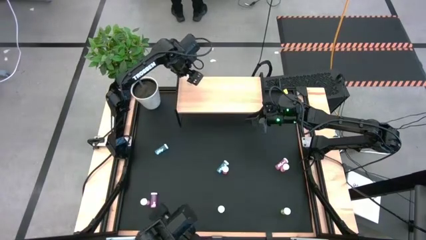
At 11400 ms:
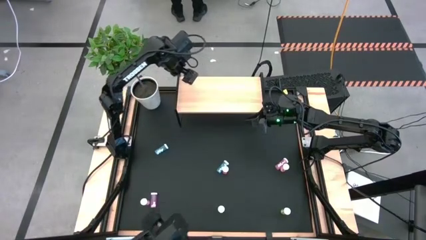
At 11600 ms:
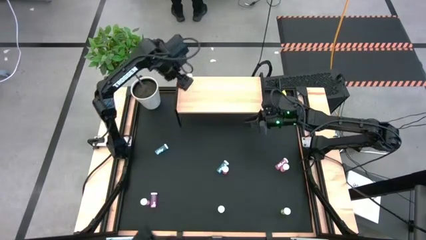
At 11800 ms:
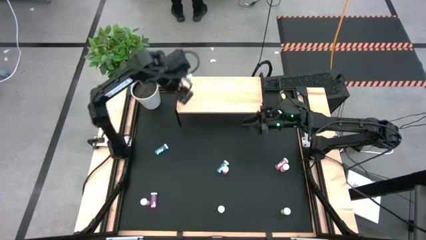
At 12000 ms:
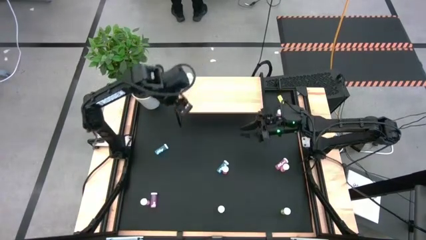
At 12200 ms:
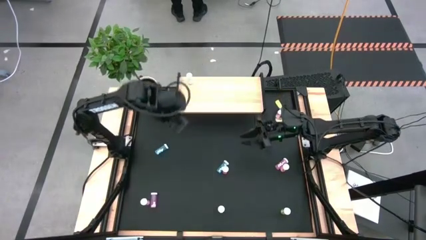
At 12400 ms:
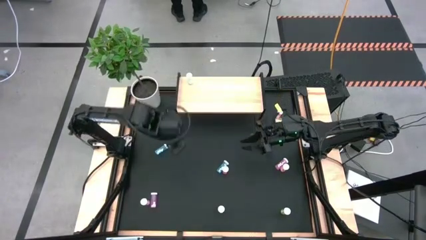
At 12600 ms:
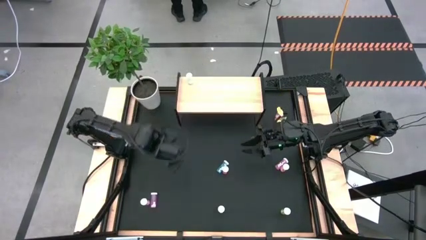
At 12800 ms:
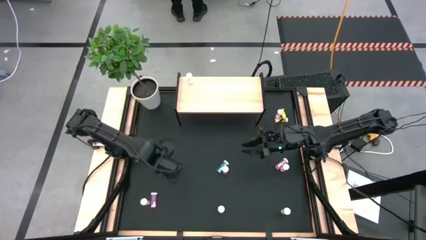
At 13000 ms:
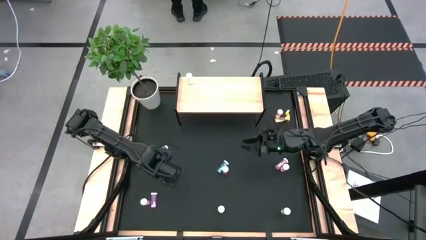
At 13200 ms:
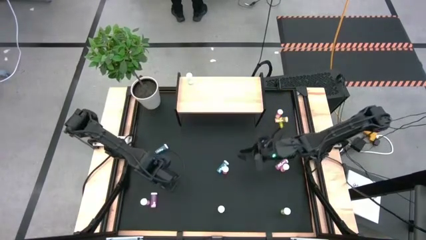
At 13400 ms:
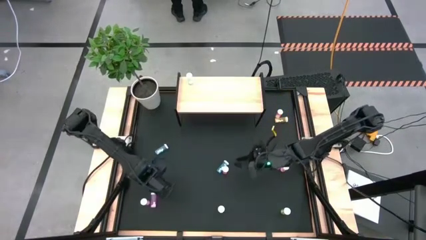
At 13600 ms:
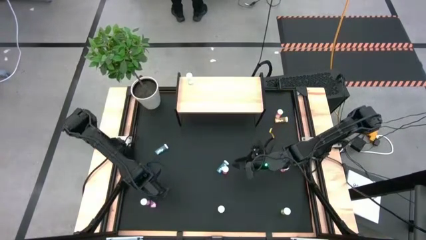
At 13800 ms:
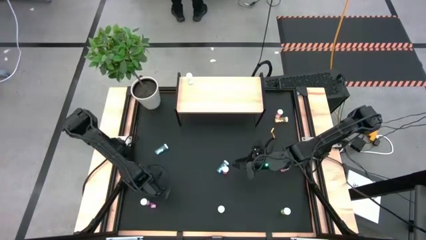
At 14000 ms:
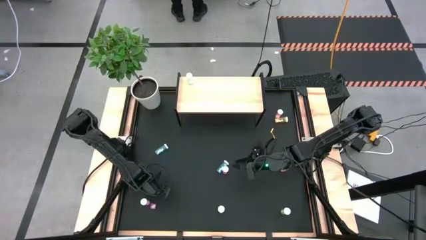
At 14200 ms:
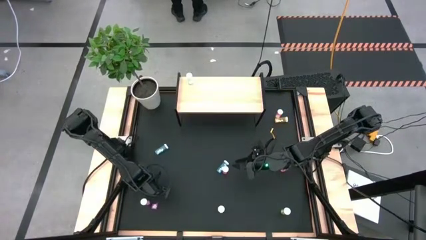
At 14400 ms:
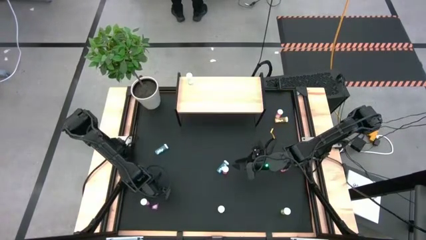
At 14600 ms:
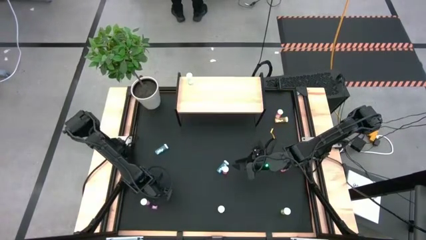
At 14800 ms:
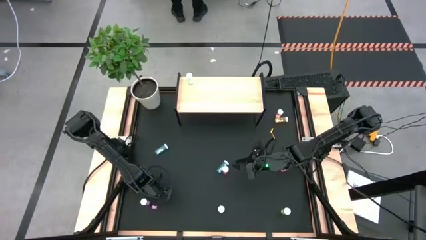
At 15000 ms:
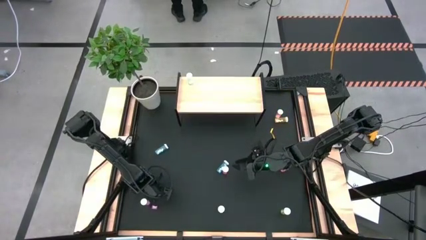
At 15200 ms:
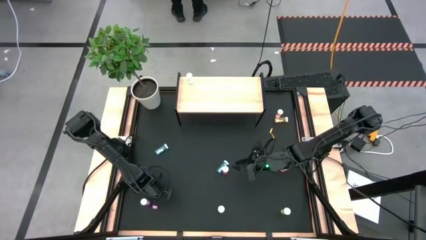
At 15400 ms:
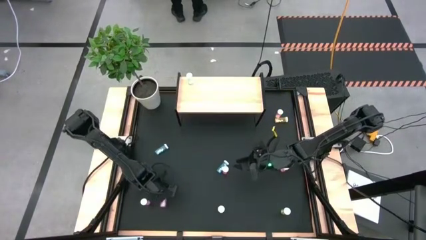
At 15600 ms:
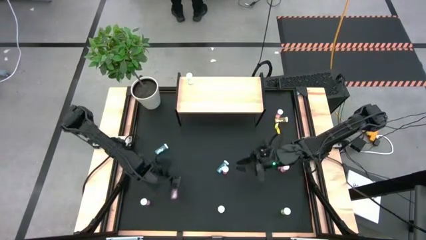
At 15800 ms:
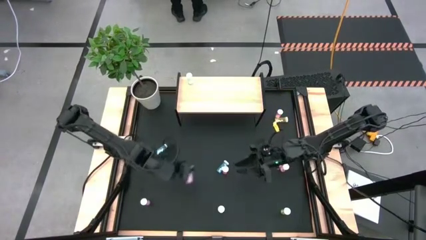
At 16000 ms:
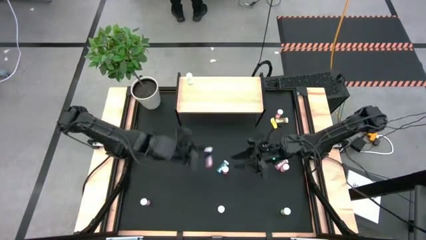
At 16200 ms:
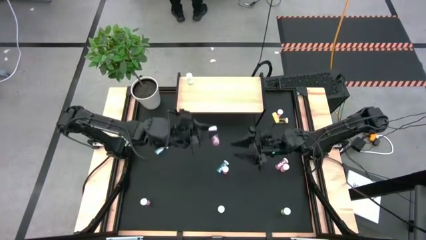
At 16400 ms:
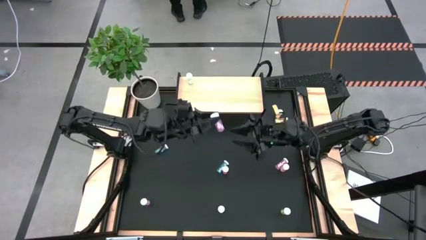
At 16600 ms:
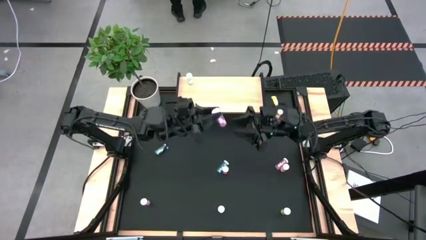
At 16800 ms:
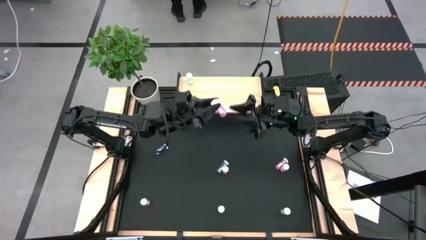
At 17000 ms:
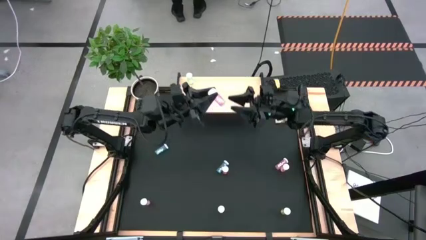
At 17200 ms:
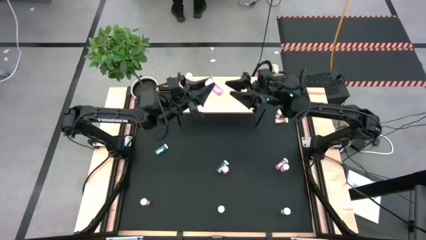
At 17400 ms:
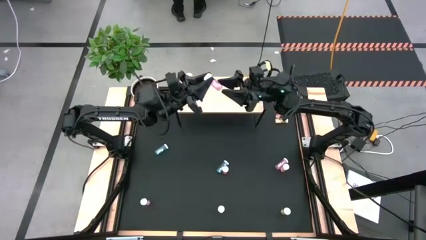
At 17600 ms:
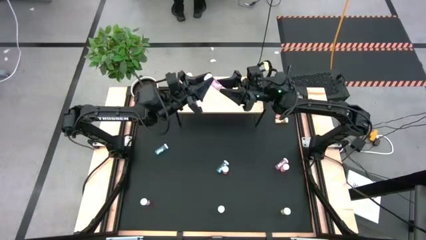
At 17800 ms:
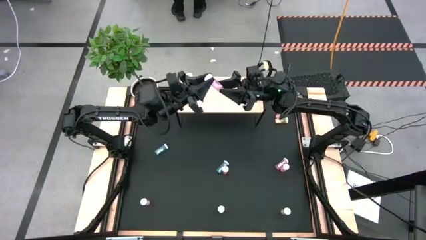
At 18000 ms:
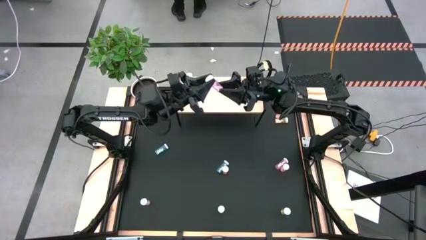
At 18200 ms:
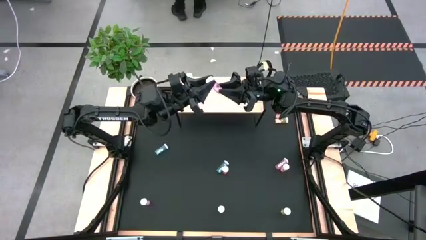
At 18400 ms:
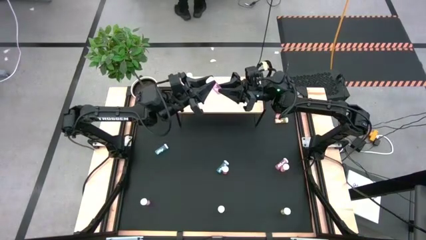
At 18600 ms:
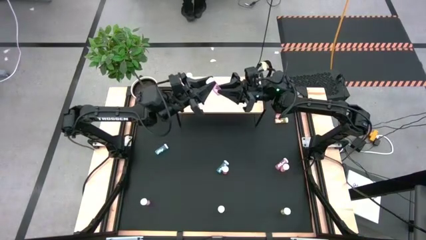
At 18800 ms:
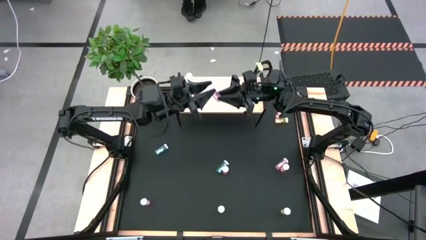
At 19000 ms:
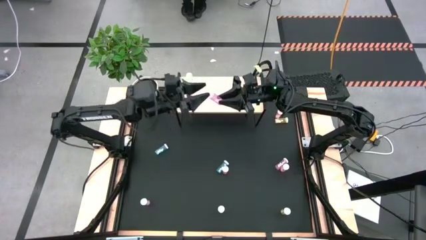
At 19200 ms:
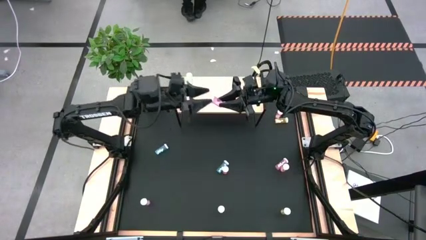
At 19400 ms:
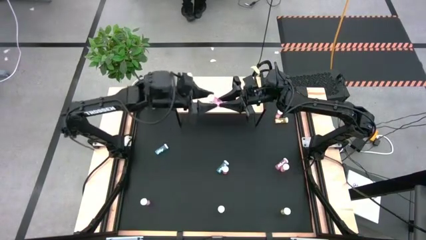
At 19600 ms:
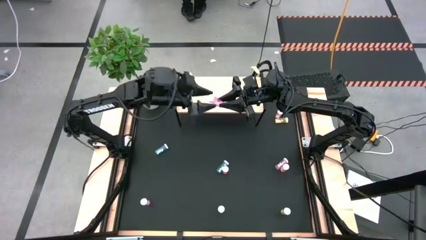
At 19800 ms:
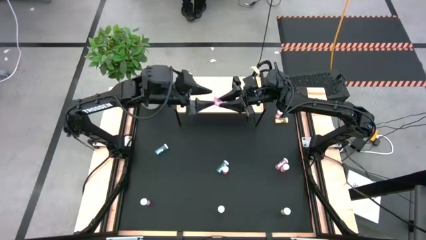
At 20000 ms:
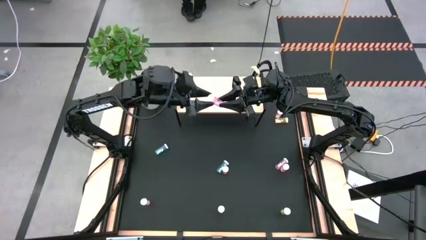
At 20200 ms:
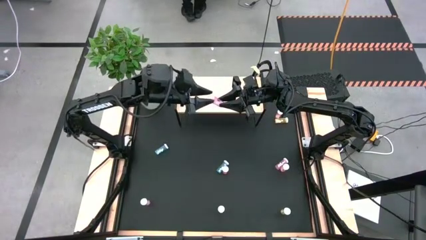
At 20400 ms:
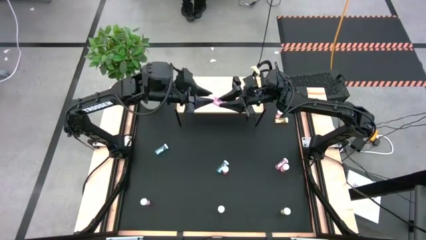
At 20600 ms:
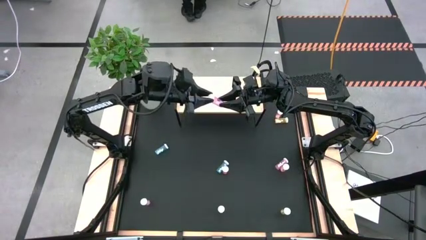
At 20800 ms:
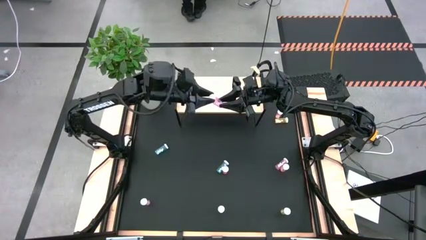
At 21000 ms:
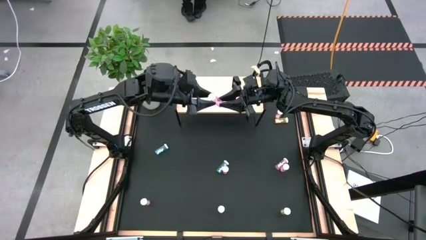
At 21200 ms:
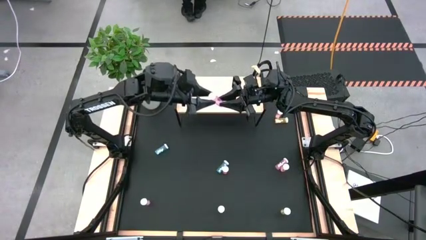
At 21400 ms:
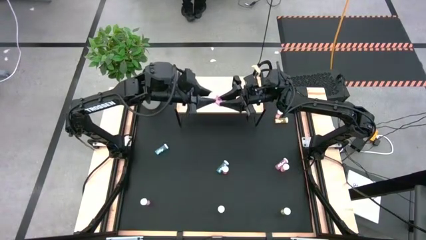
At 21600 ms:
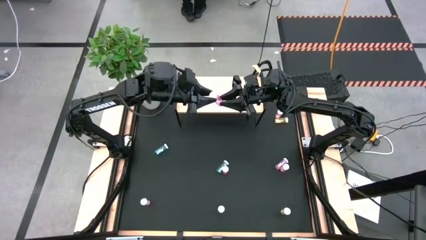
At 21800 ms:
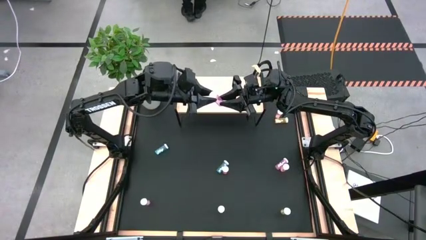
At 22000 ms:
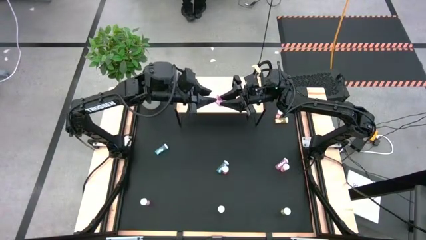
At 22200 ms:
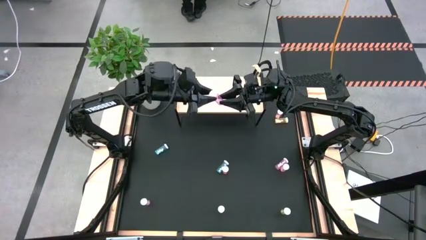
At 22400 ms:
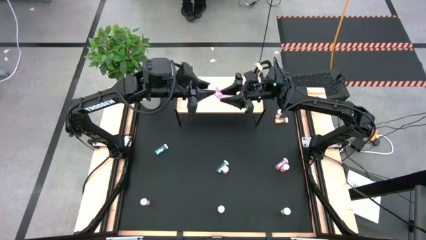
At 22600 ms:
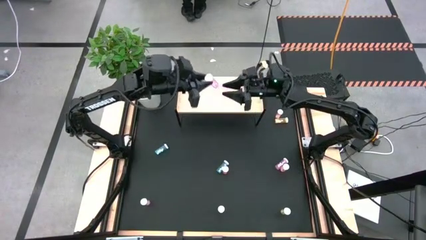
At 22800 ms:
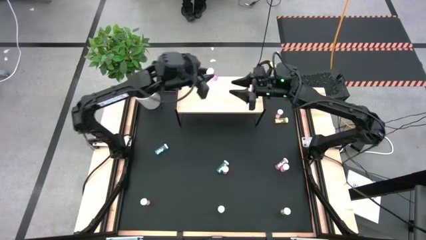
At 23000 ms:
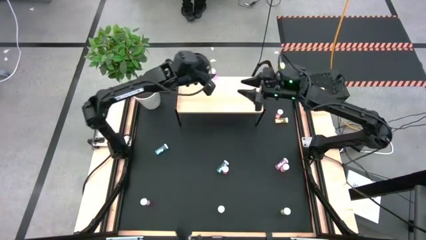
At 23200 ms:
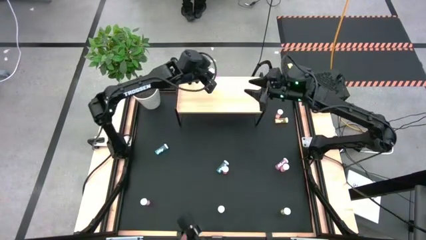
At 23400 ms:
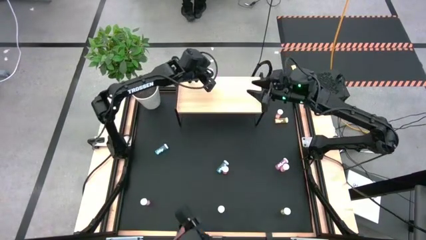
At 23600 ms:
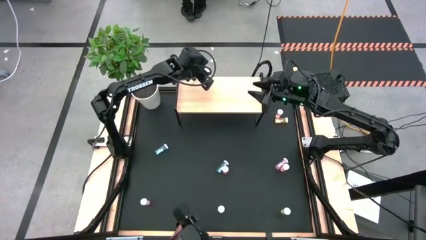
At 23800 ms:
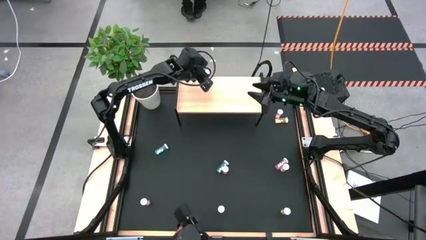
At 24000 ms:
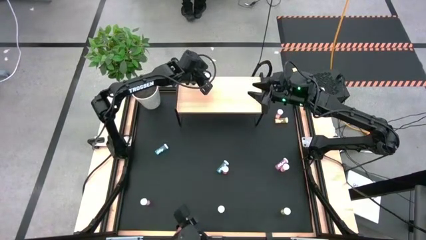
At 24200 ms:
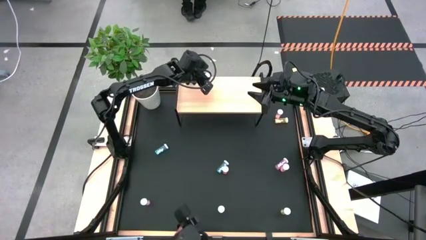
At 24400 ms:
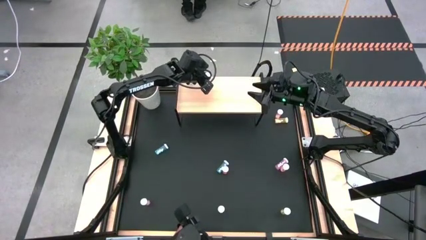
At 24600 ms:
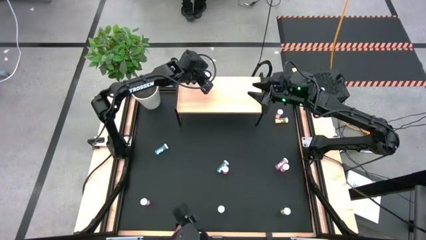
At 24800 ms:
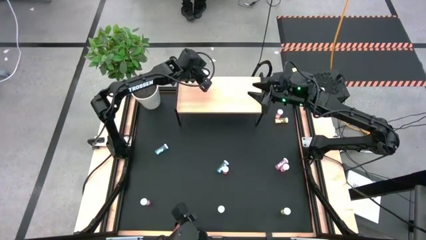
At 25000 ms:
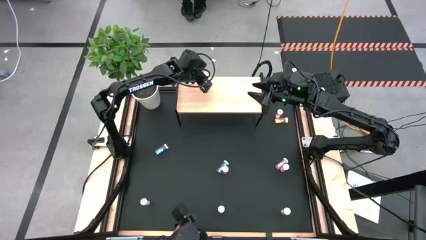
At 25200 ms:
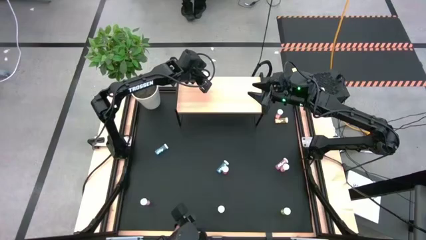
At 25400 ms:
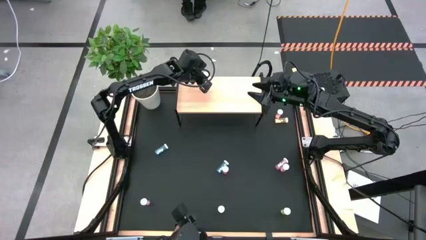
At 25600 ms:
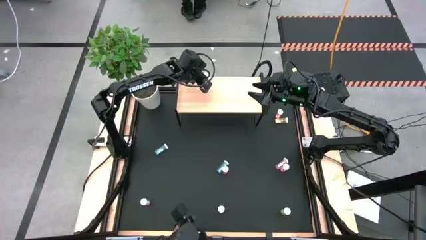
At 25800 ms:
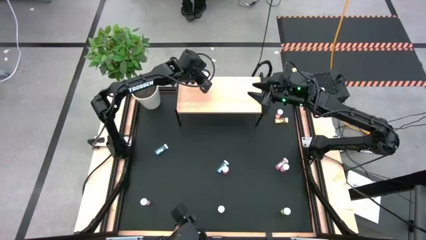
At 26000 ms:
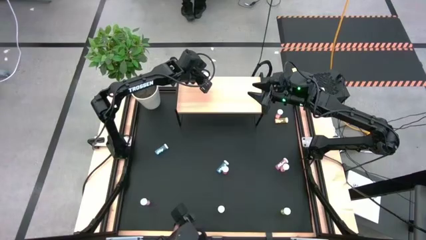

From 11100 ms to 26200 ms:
Task: Pick and place medicine bottles onto shelf by color
Put the bottom right pink pill bottle on the shelf
